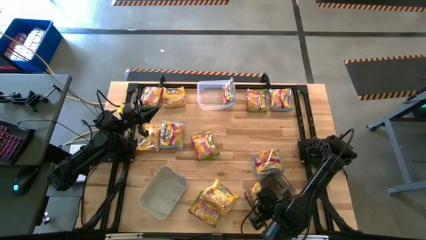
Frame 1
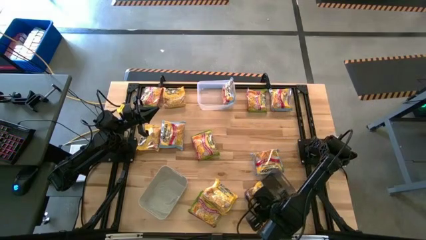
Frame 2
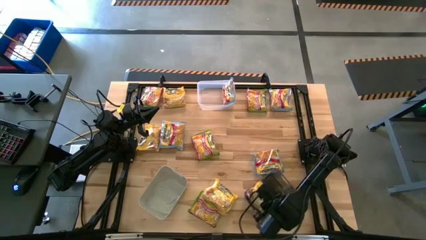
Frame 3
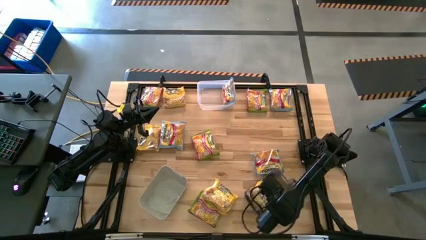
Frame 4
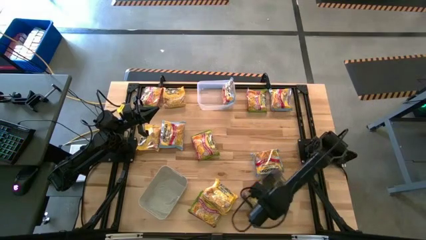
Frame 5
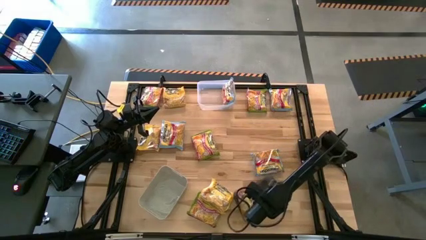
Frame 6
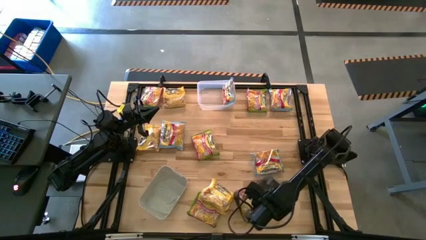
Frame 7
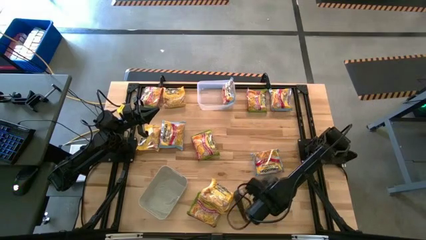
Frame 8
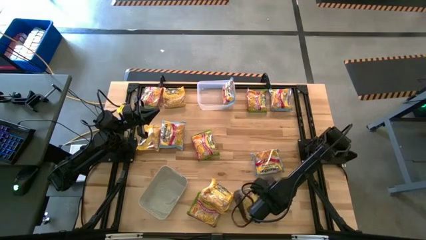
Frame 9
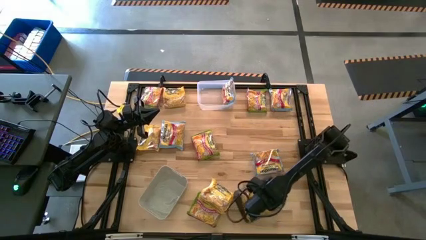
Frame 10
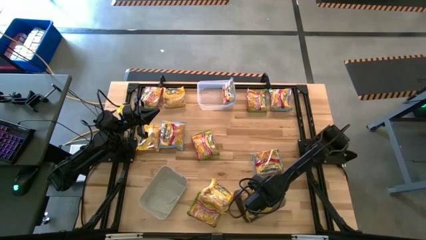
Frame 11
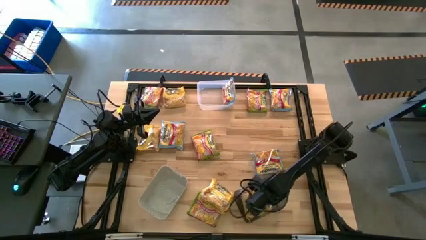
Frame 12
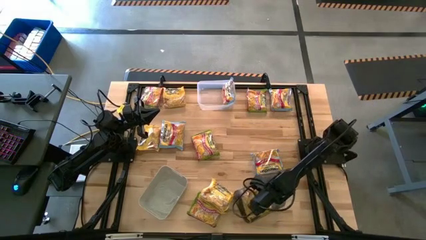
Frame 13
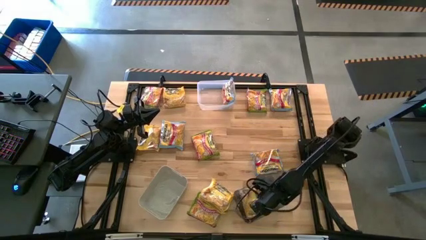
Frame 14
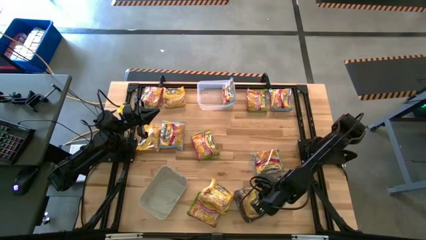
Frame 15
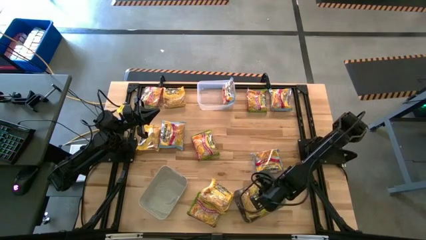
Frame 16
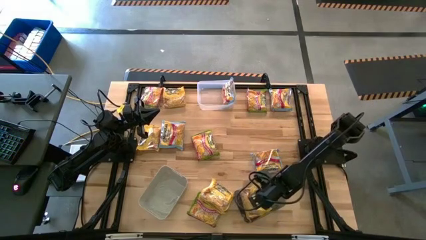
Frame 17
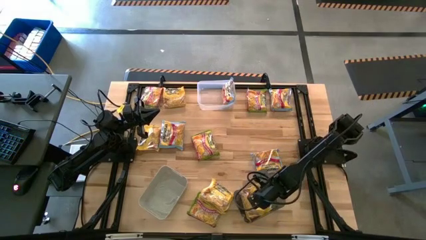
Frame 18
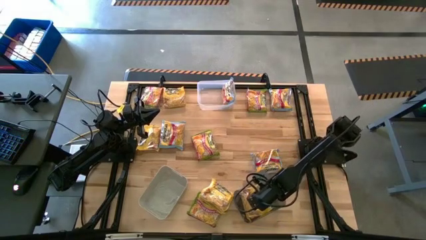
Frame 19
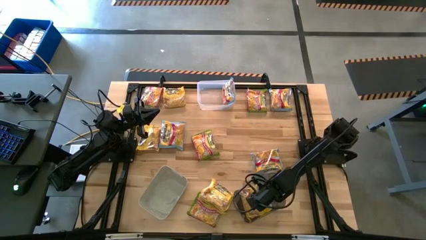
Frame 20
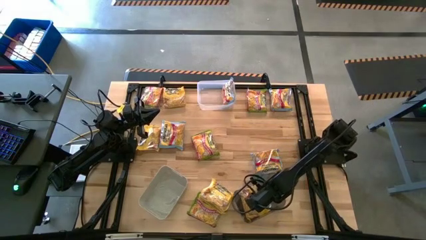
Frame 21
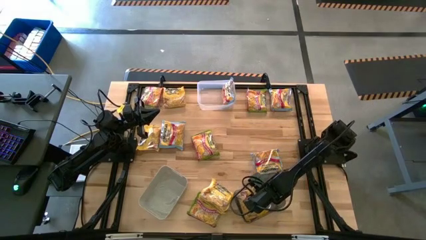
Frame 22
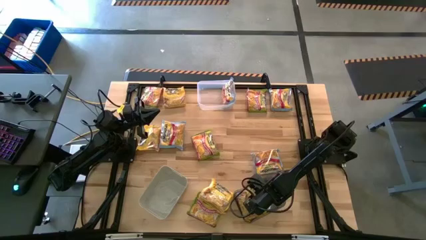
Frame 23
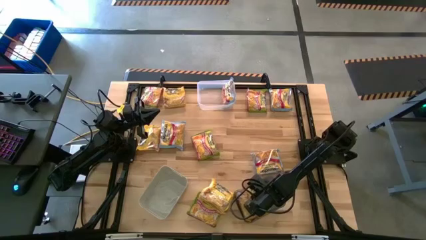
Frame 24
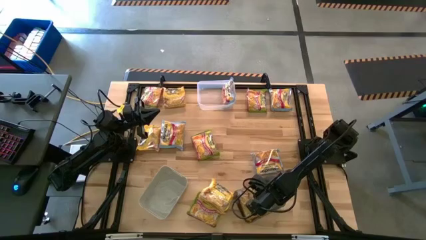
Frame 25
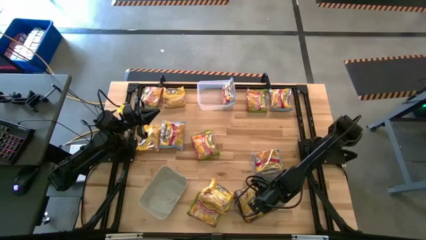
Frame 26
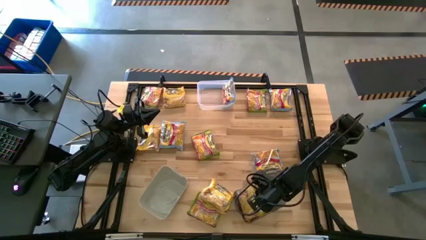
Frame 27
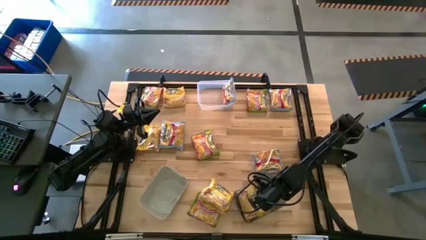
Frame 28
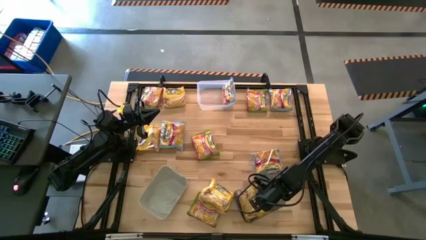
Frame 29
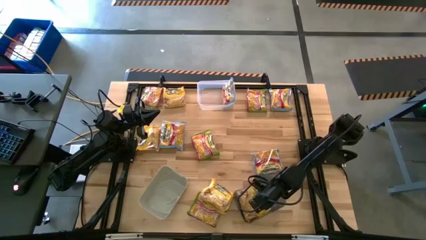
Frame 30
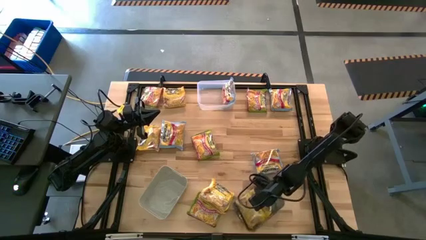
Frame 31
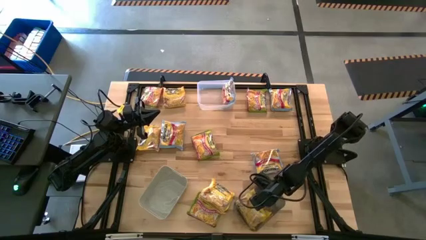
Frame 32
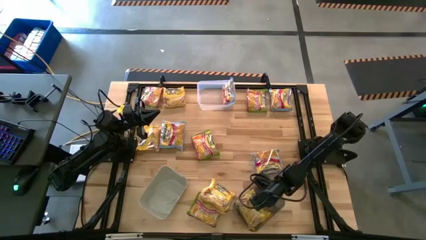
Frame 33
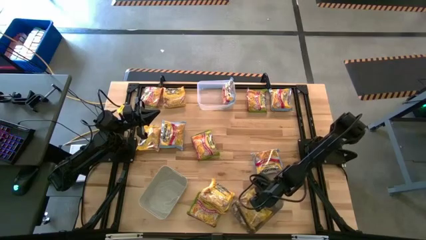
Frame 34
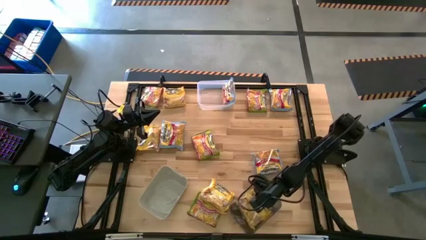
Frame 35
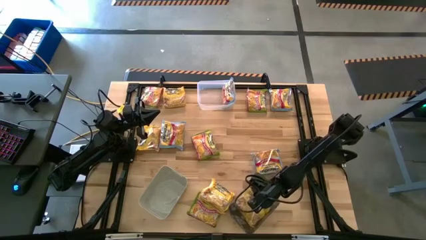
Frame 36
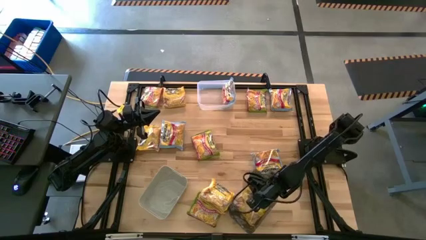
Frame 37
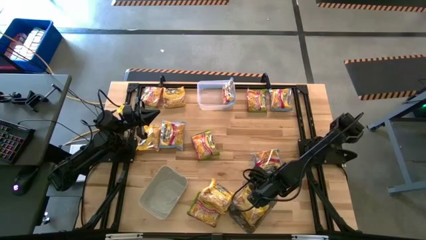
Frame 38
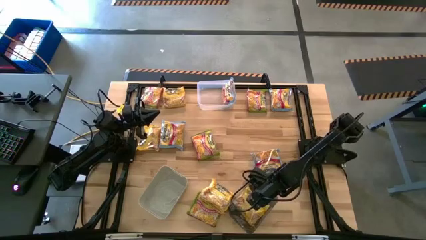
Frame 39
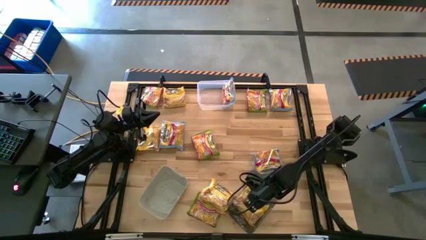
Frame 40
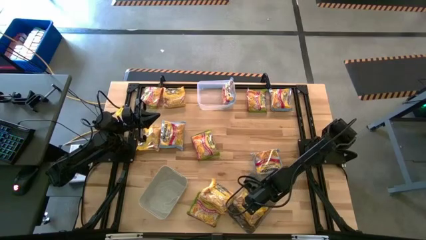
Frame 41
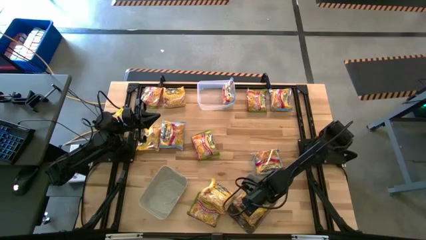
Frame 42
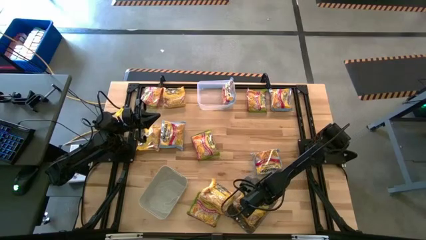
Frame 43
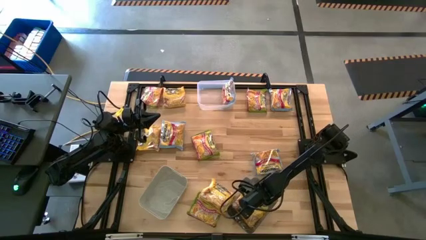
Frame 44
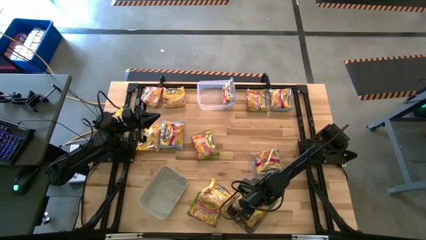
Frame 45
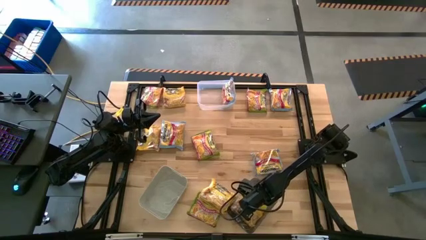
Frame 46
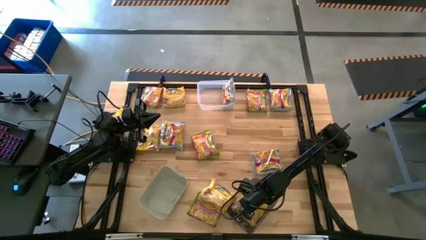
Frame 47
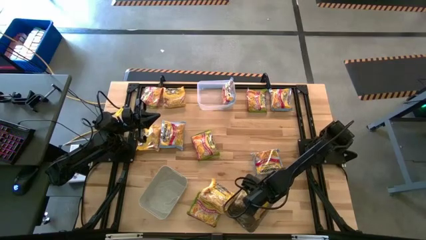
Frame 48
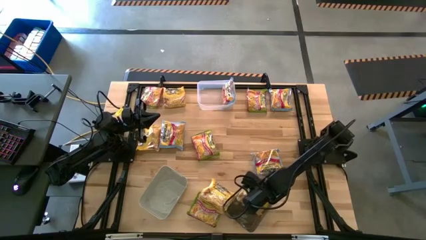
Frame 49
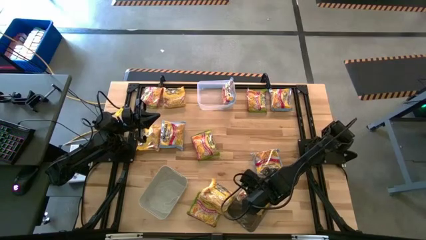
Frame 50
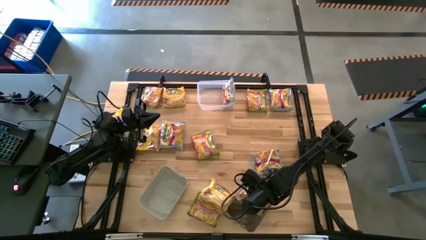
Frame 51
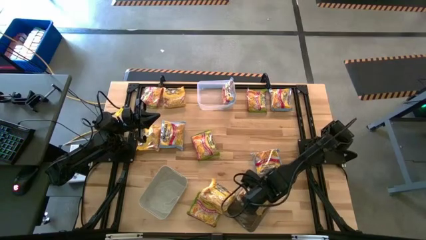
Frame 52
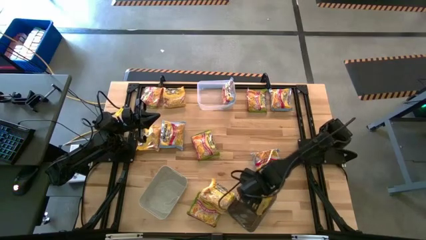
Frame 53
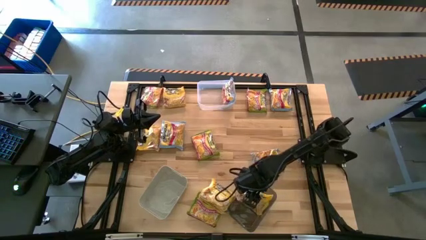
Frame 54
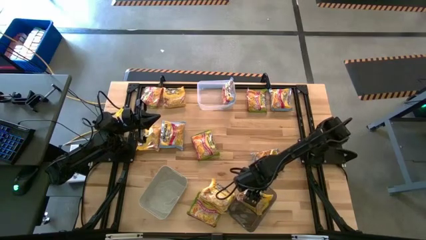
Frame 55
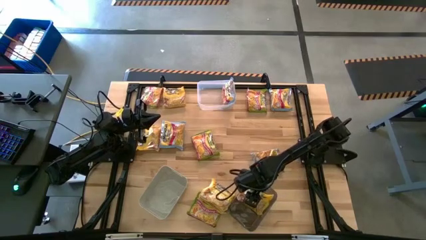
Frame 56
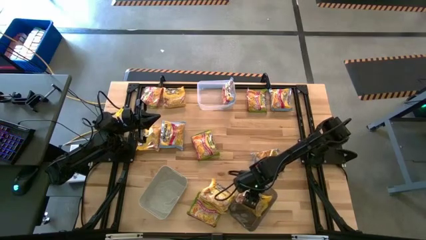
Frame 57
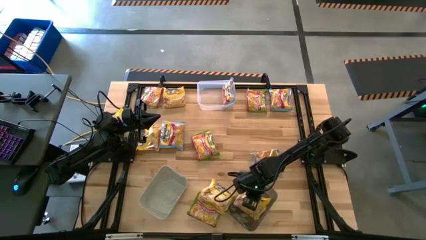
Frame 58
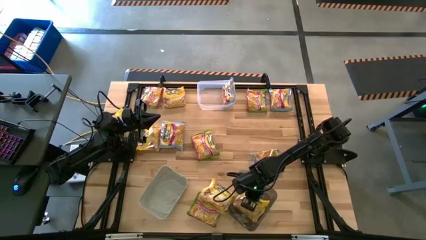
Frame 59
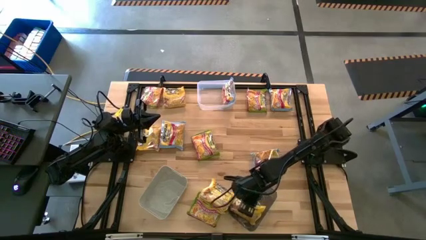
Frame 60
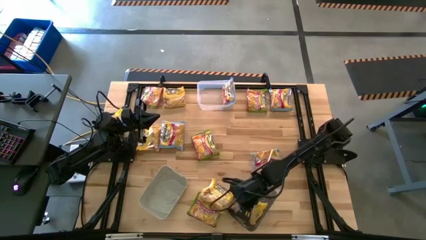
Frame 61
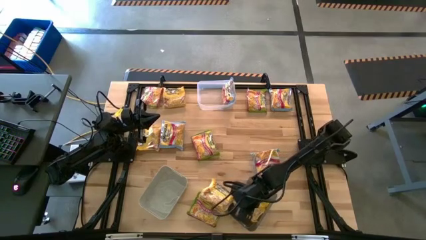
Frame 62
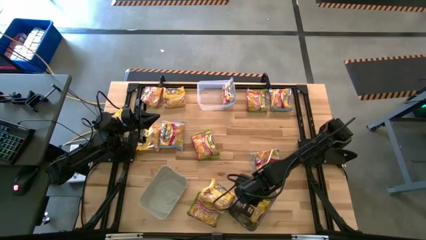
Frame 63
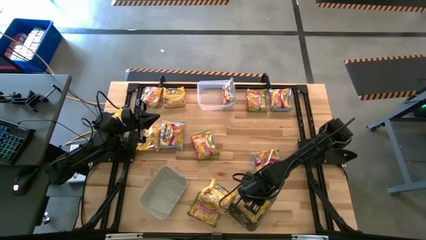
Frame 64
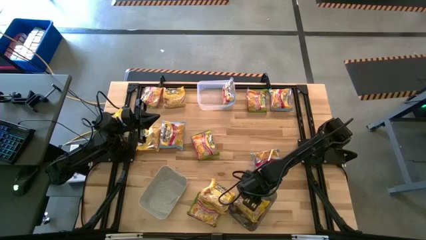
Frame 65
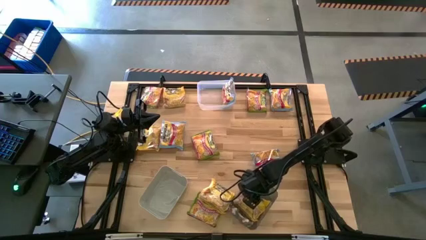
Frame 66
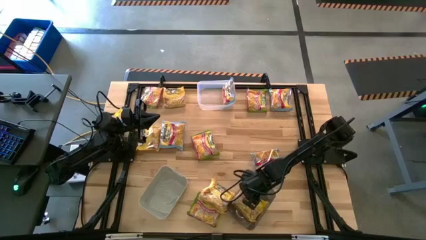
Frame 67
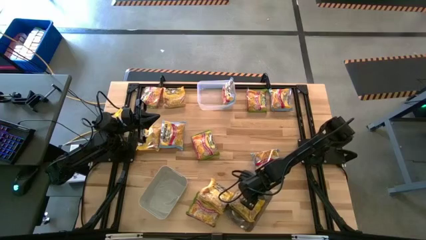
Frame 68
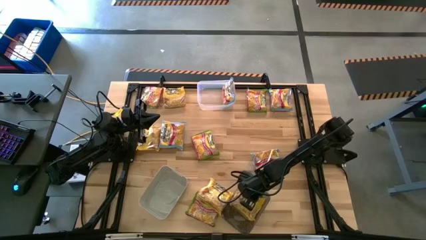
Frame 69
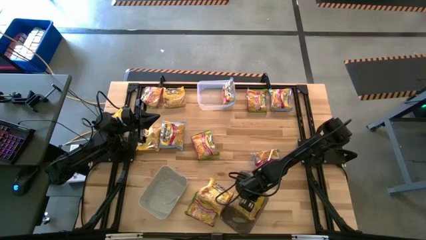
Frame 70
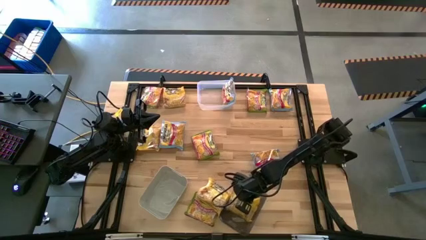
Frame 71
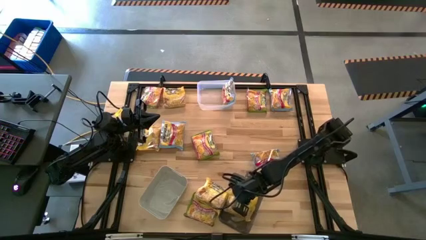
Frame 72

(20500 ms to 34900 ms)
Task: Sort Maruchan noodles
Adjust the yellow noodle pack in the black bin

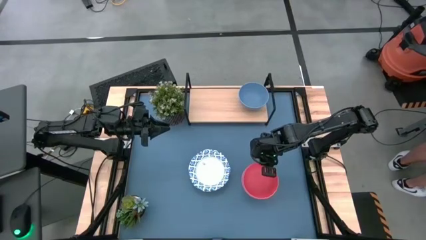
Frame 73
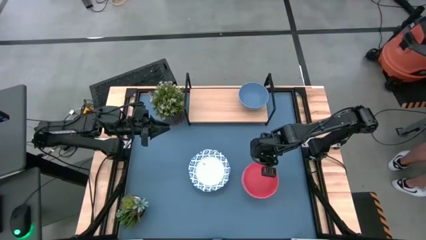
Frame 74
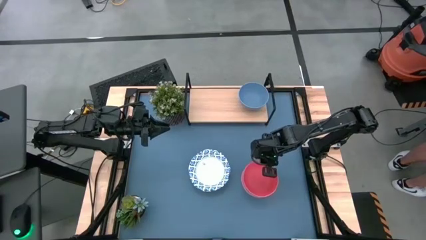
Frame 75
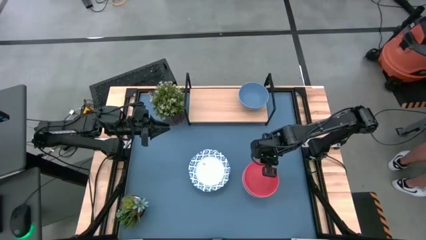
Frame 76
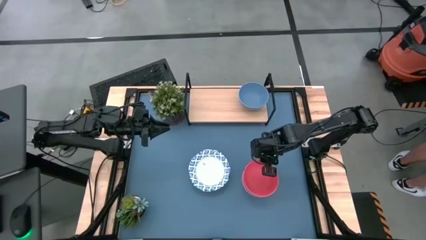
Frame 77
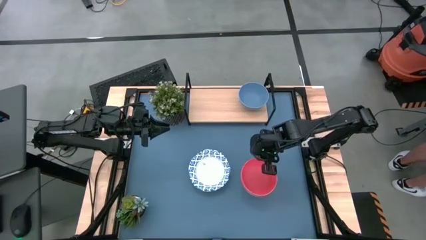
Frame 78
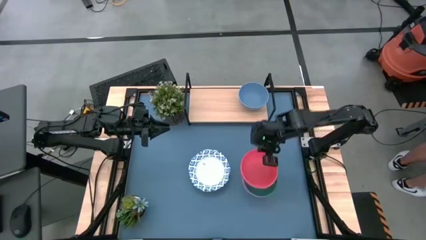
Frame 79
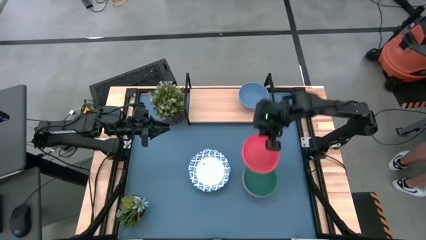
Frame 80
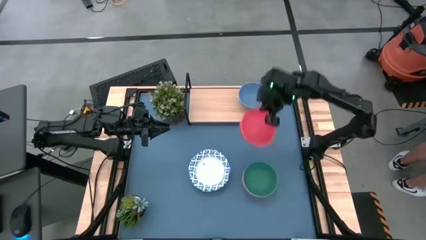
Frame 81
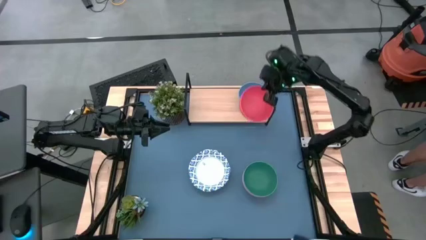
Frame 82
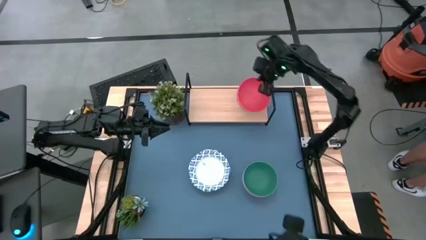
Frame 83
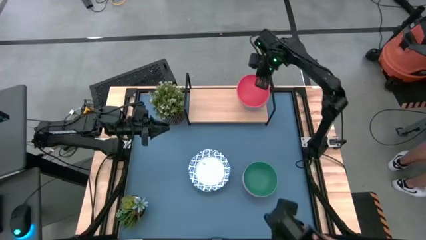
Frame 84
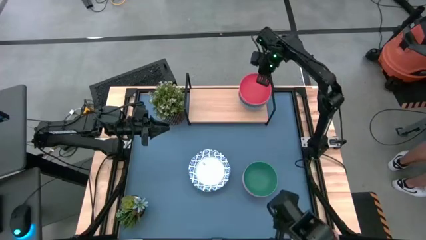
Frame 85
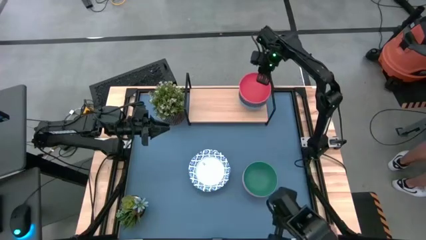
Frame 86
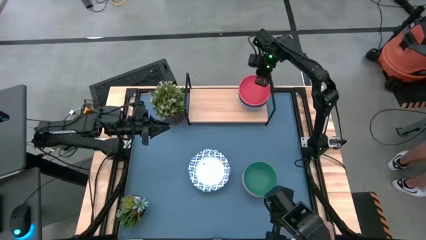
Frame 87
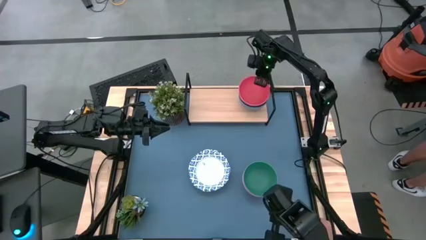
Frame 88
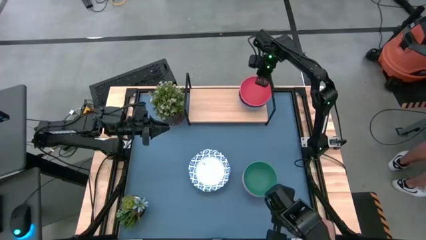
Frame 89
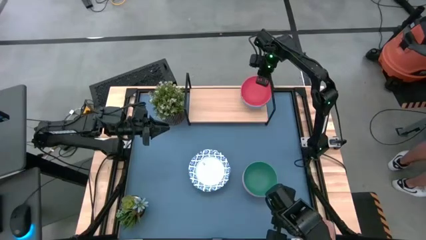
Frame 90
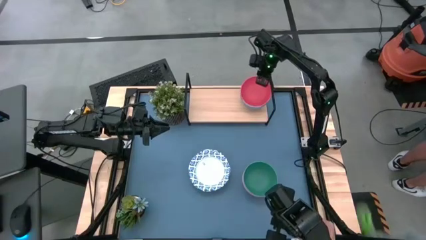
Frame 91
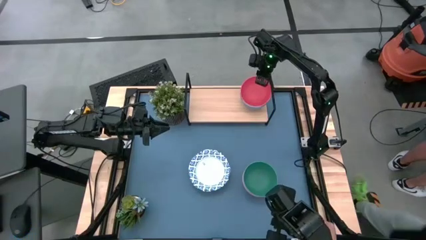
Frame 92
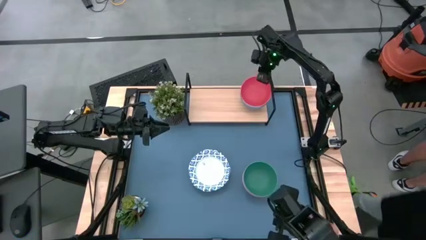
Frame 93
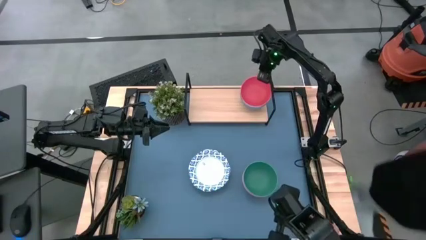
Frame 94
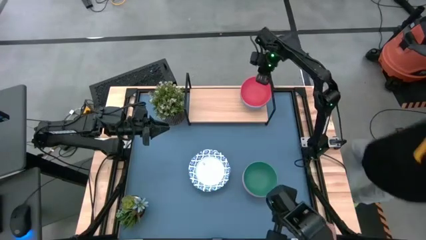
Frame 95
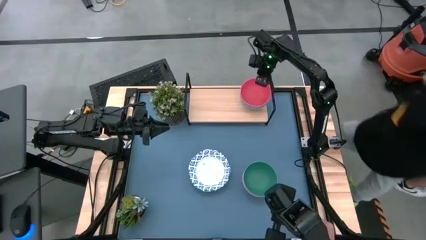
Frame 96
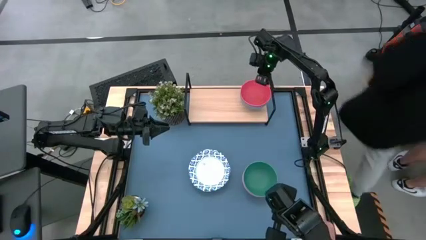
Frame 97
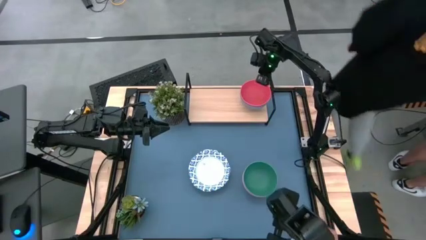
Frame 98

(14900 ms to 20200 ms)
Task: Place and stack bowls onto a shelf
Stack the orange bowl on top of the blue bowl on the shelf
